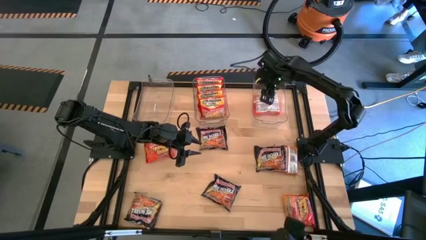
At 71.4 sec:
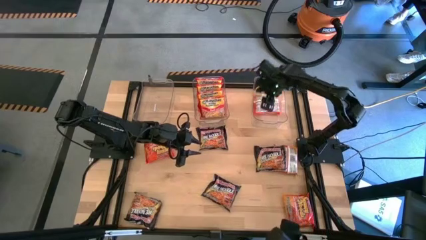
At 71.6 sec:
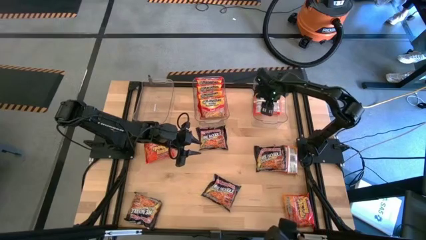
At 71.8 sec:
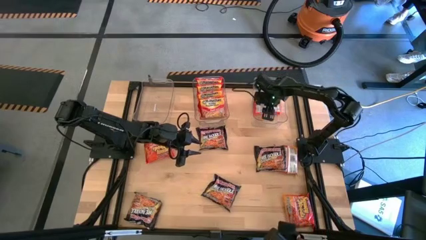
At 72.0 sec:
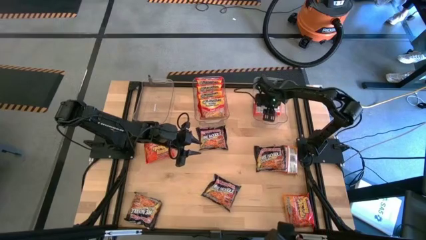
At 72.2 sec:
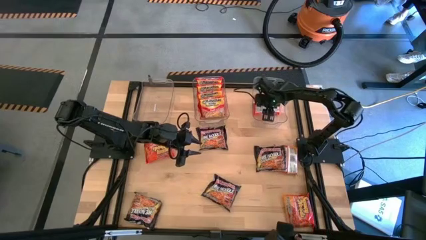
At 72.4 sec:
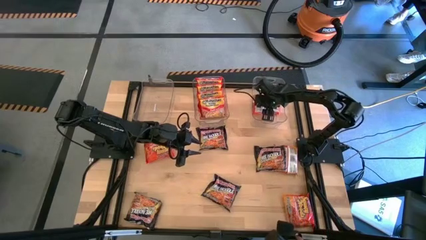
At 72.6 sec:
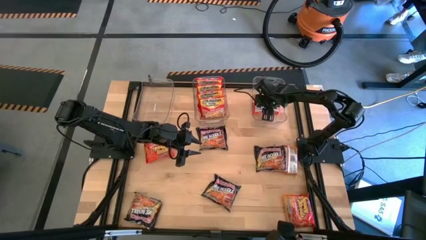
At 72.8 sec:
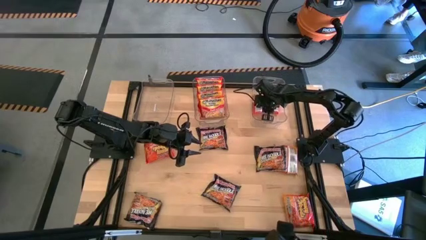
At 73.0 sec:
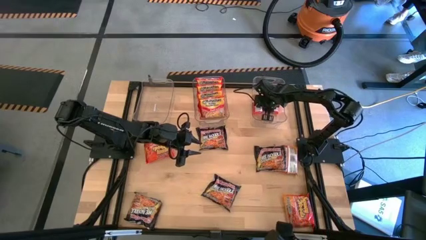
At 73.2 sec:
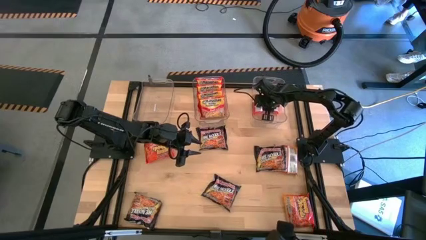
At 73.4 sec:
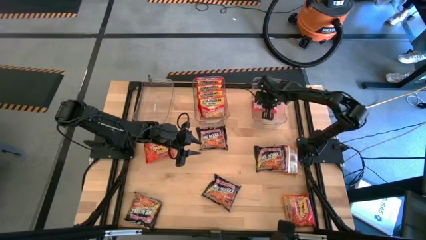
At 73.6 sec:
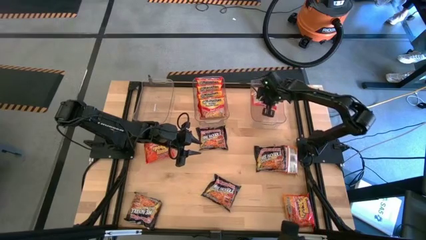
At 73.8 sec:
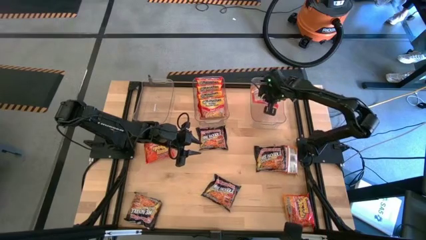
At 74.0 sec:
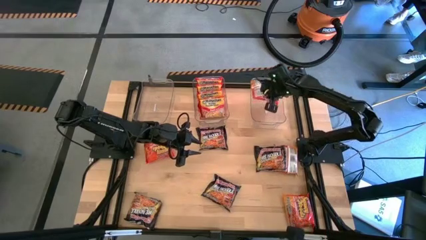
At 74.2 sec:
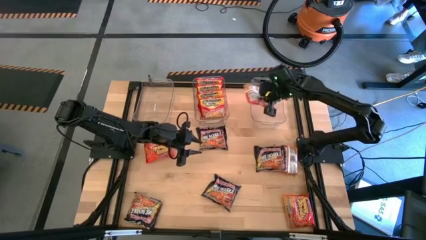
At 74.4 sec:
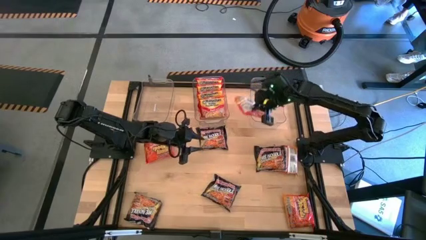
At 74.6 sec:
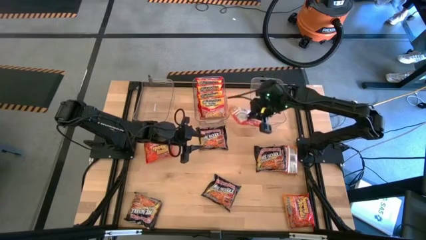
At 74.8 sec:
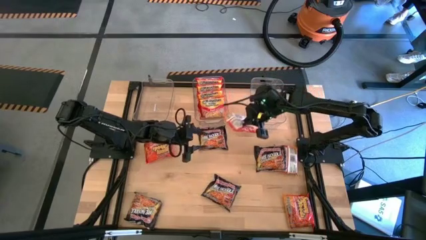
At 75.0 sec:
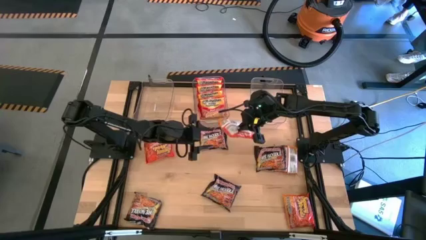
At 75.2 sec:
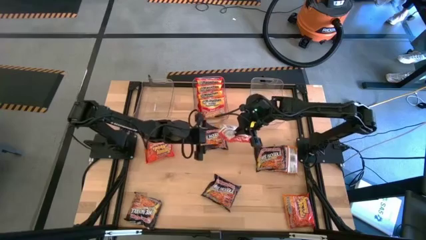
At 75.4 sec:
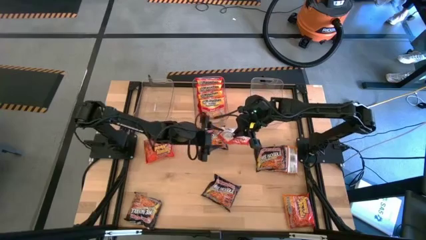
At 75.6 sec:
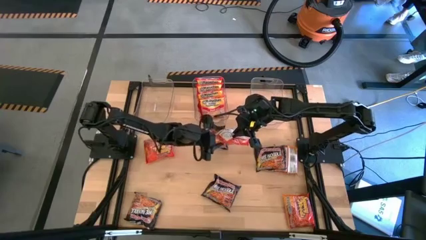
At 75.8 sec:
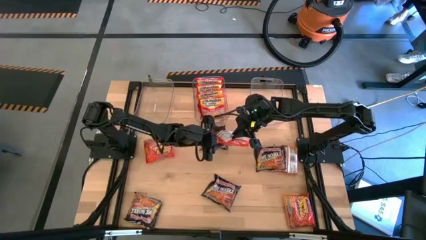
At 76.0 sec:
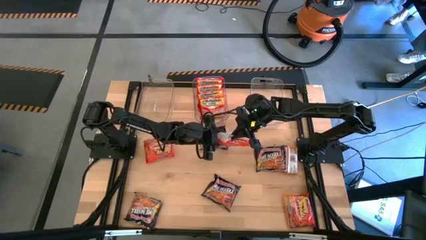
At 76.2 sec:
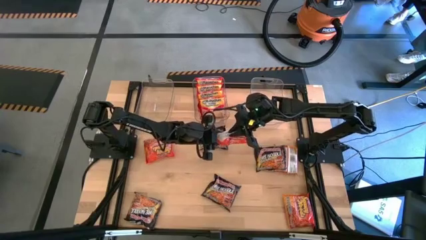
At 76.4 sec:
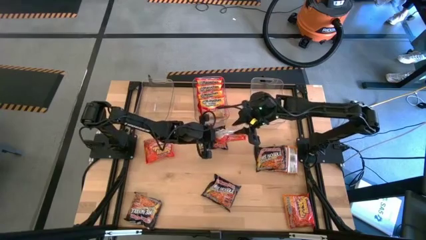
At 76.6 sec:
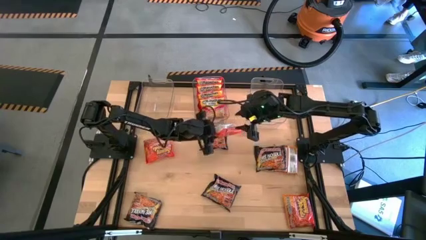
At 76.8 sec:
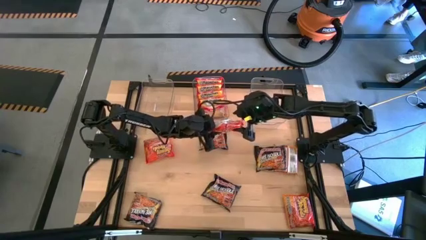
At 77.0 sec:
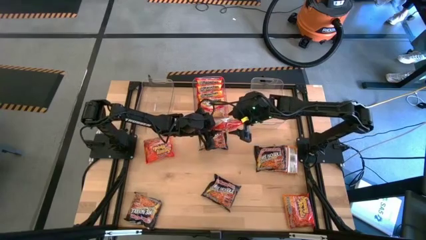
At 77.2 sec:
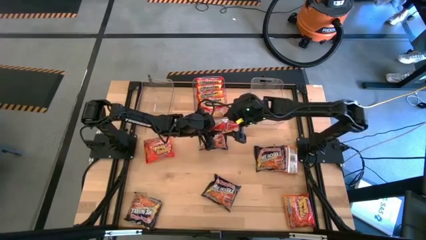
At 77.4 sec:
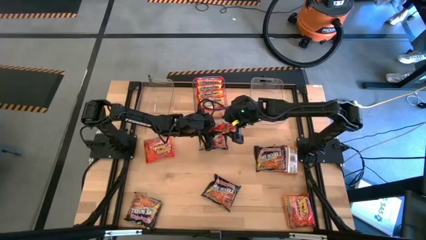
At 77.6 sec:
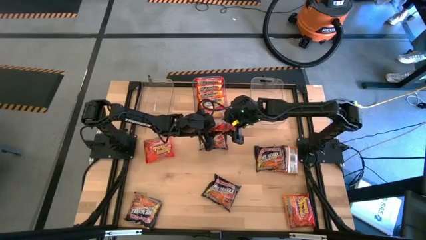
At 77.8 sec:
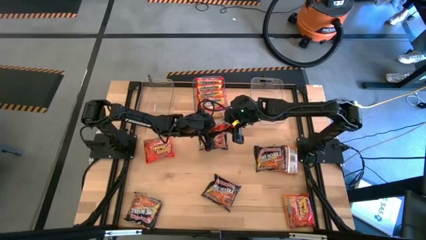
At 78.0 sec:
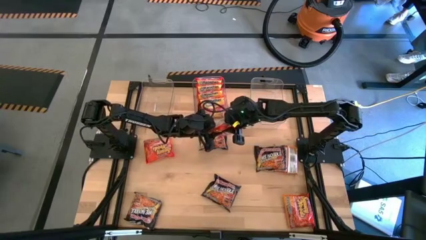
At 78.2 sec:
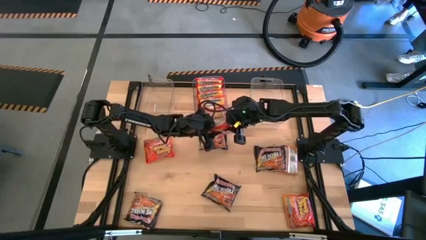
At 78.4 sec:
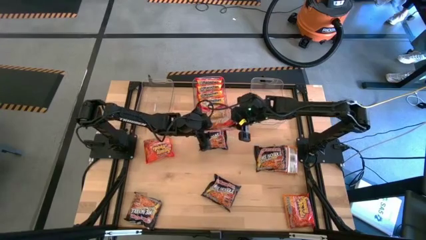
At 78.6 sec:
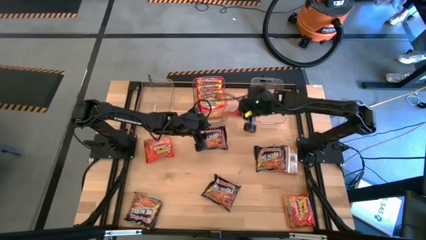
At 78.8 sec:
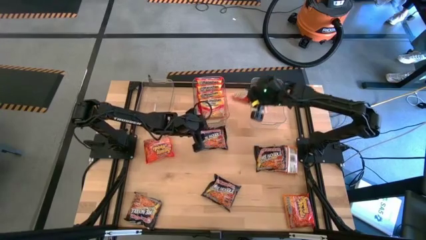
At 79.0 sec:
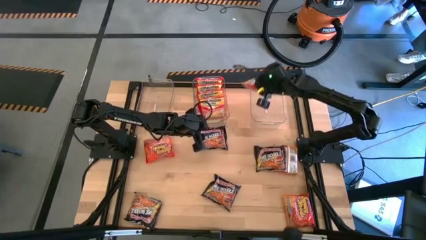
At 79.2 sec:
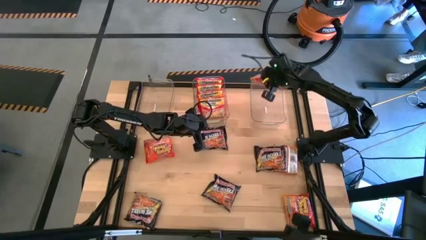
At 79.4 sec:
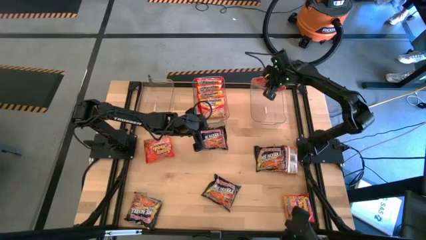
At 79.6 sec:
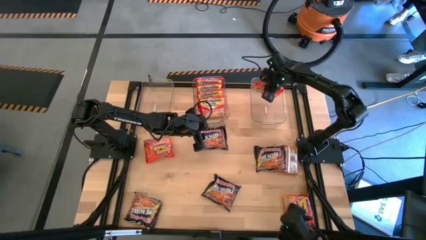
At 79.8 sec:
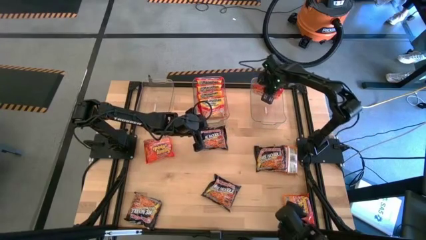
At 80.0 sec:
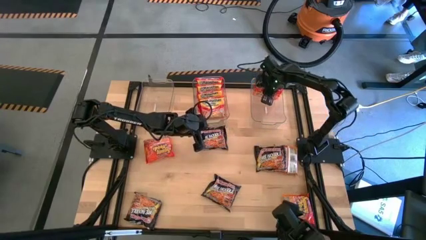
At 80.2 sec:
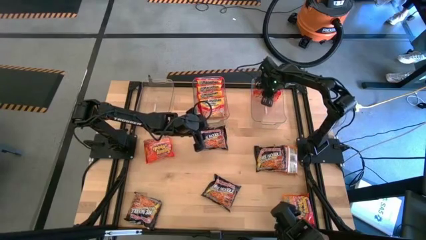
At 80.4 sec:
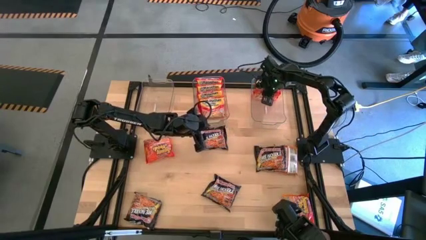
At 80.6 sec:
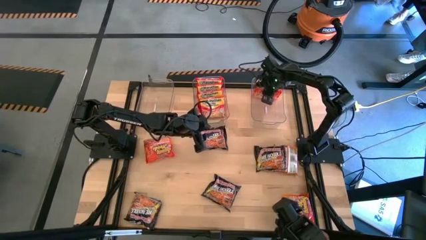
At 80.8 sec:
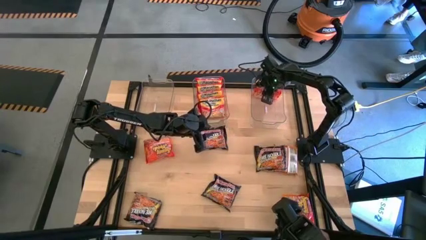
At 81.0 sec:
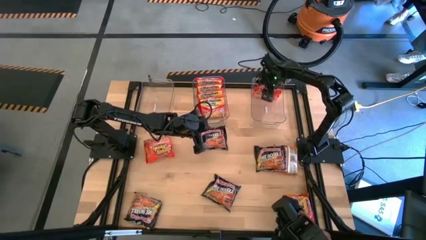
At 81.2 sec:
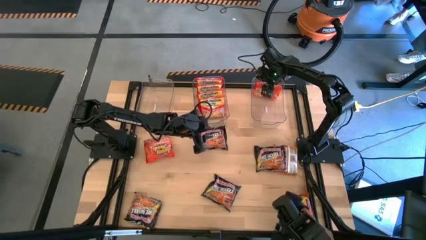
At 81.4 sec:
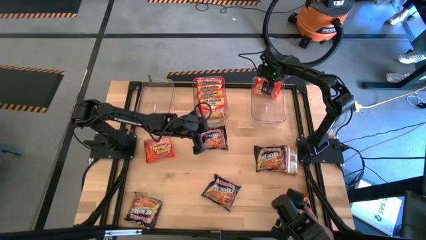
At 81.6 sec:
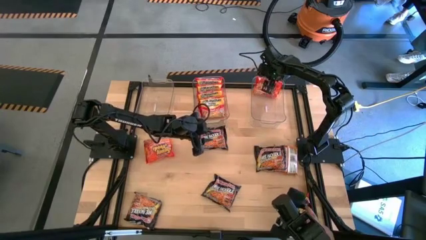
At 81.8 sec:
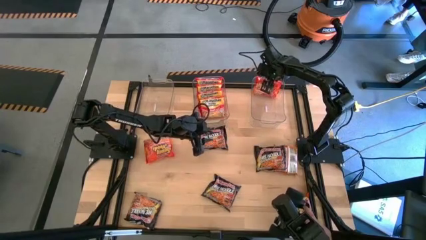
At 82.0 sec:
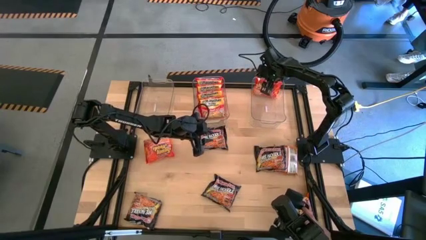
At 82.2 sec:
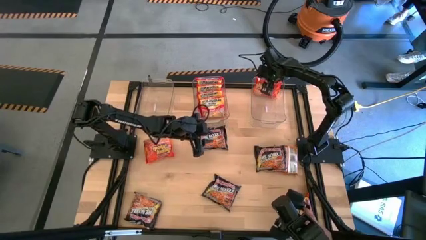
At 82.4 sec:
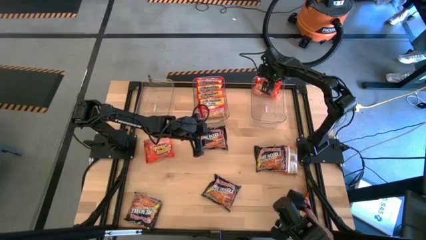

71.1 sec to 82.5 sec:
Task: Sort Maruchan noodles
Put the top orange noodle pack into the right transparent bin

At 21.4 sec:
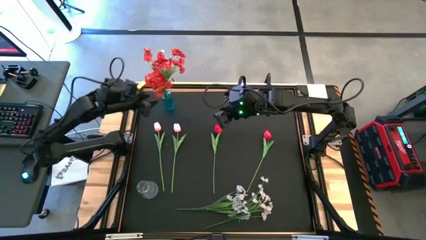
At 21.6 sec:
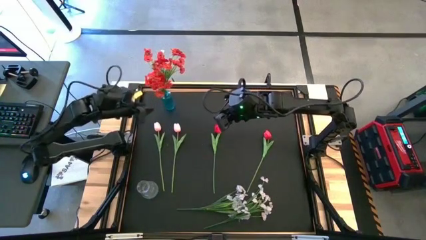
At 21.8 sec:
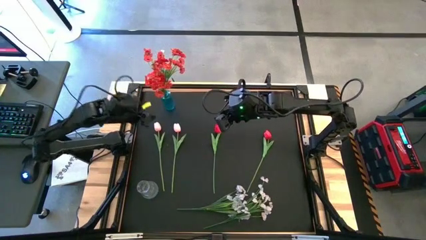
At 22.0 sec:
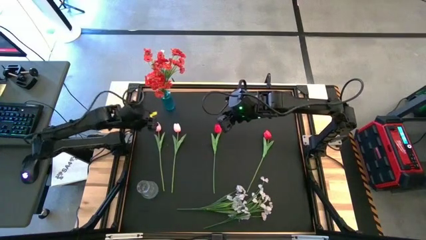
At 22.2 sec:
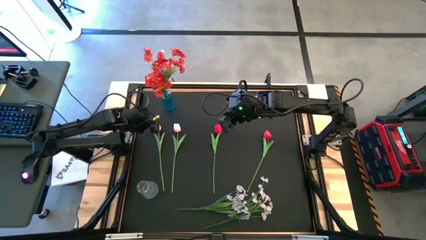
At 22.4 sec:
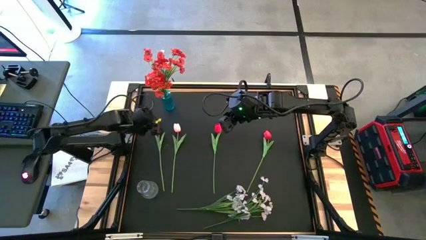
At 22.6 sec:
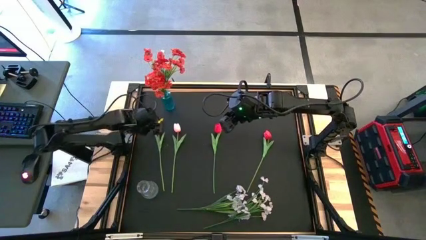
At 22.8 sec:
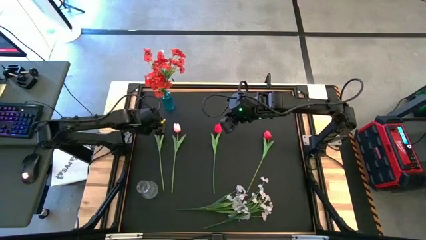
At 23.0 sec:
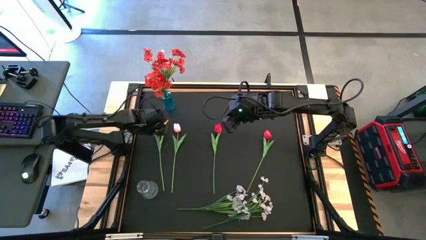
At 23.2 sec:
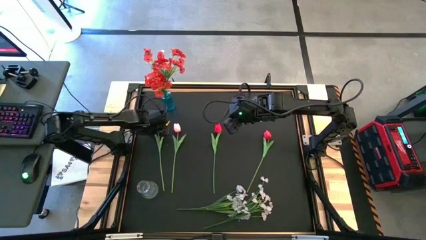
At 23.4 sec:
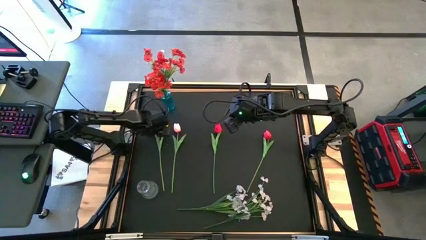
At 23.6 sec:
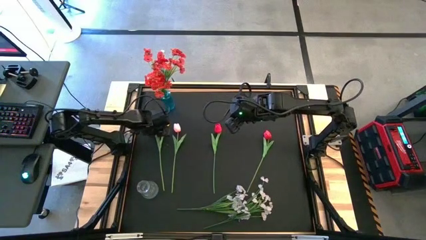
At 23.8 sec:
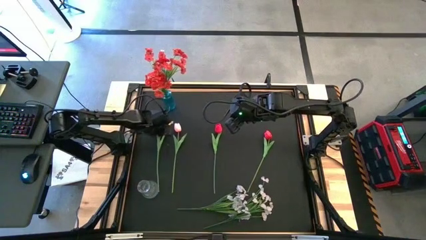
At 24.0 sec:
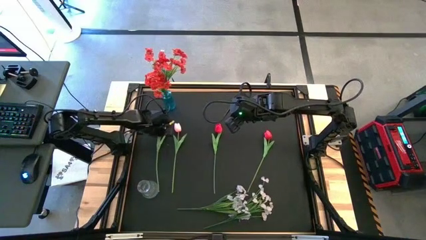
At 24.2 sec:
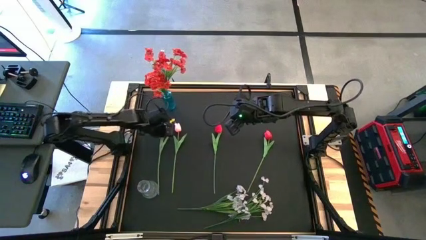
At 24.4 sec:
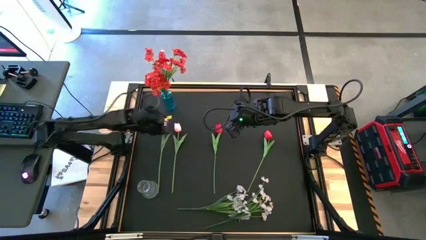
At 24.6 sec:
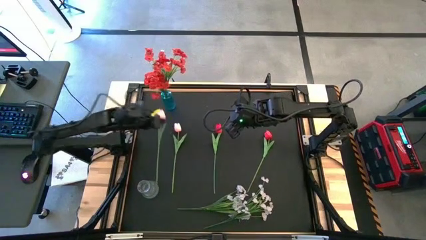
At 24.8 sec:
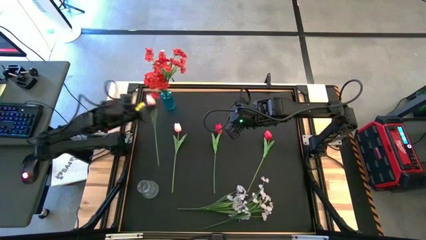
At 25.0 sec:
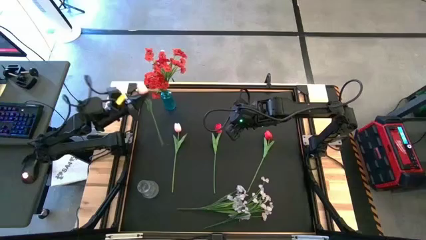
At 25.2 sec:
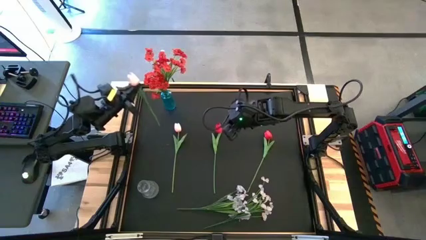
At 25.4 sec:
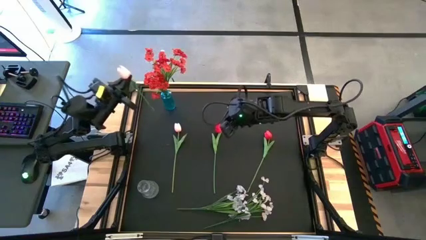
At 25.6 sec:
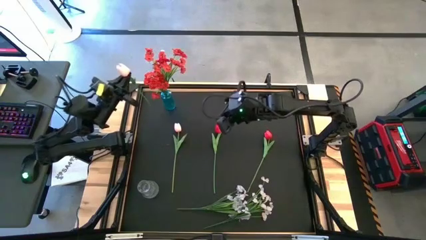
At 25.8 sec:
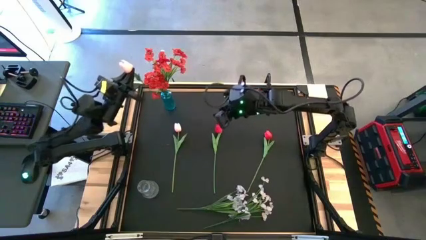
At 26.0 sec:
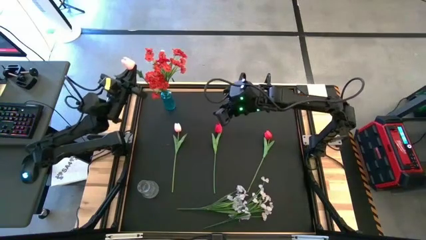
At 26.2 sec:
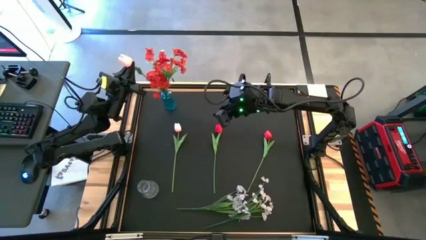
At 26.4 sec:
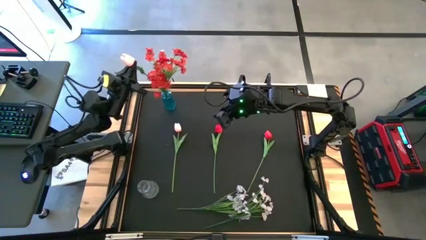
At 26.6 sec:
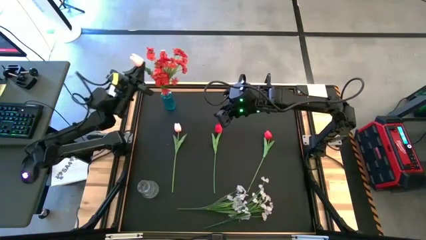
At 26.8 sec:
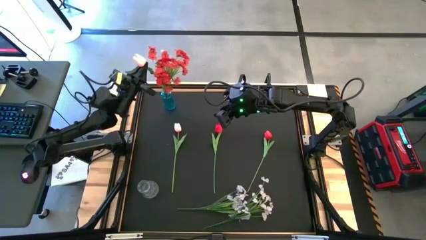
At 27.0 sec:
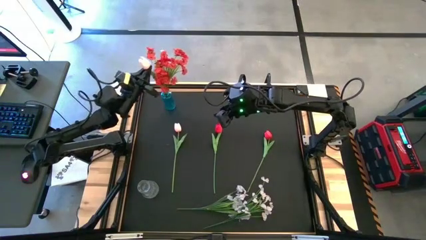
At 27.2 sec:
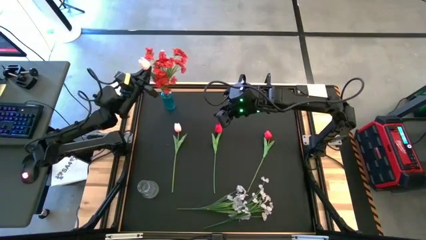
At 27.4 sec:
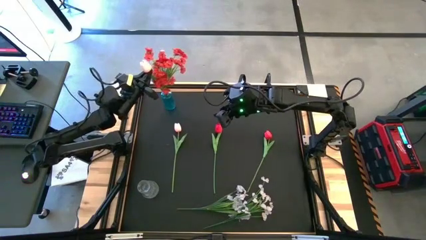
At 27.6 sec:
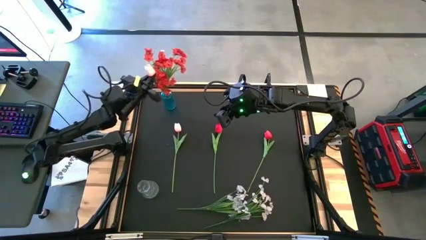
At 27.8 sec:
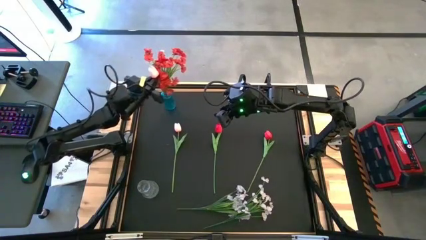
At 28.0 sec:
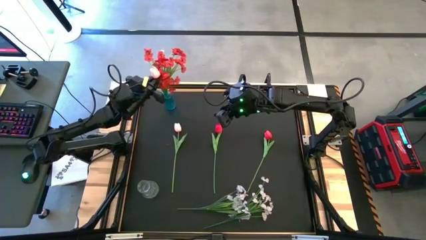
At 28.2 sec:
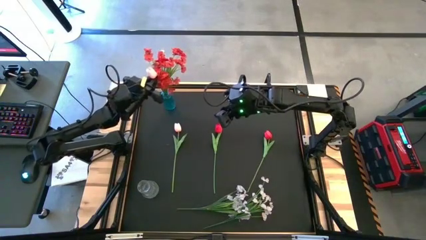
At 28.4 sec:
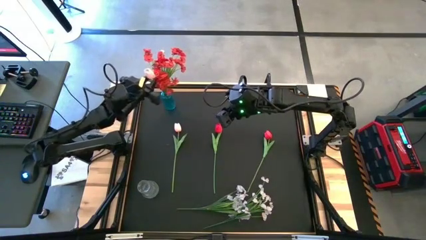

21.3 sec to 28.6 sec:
Task: Sort flowers into vase by color
Put the left pink tulip into the blue vase
